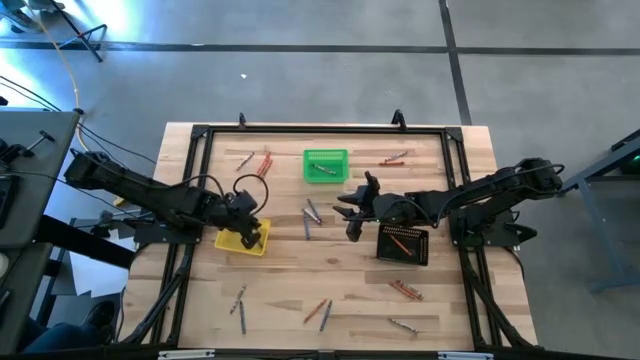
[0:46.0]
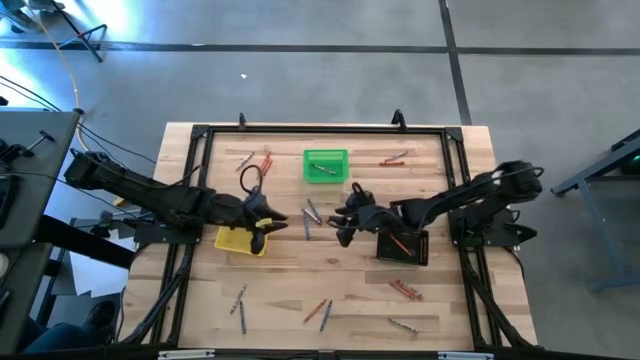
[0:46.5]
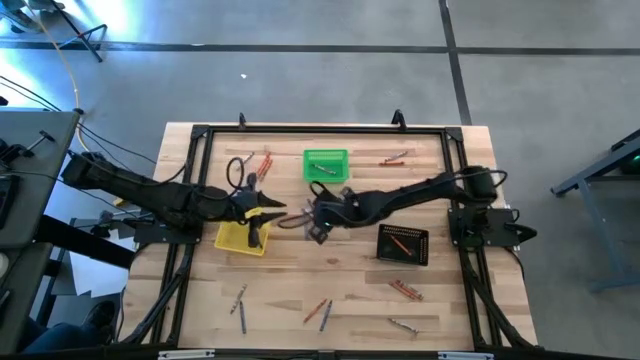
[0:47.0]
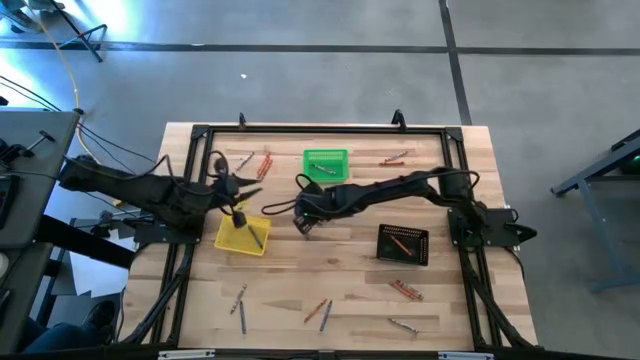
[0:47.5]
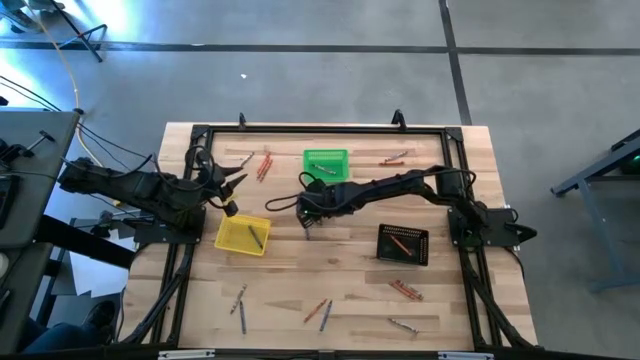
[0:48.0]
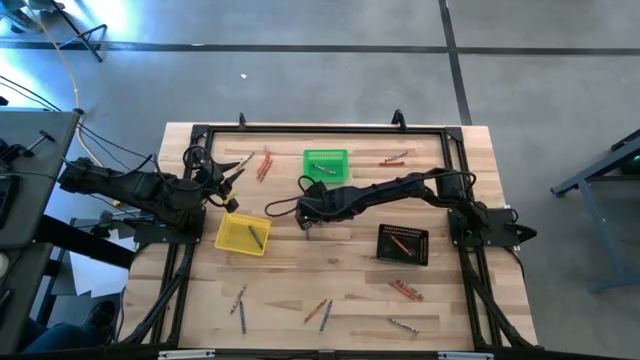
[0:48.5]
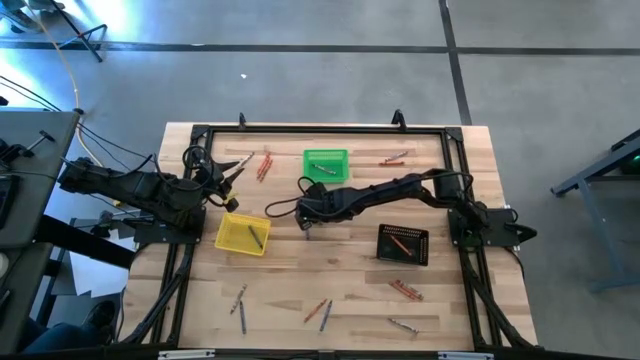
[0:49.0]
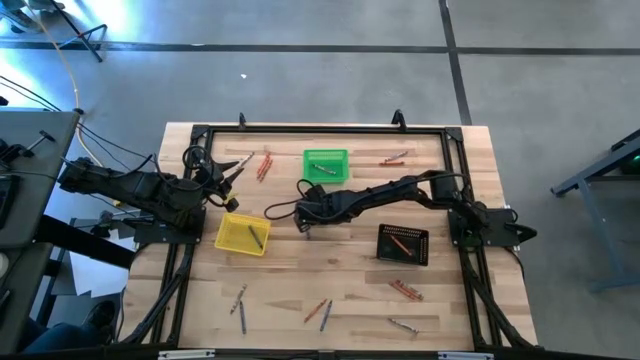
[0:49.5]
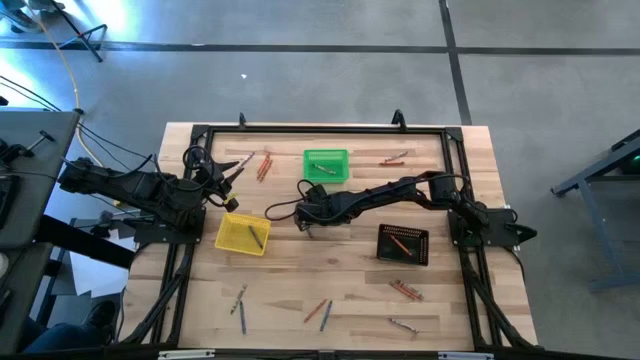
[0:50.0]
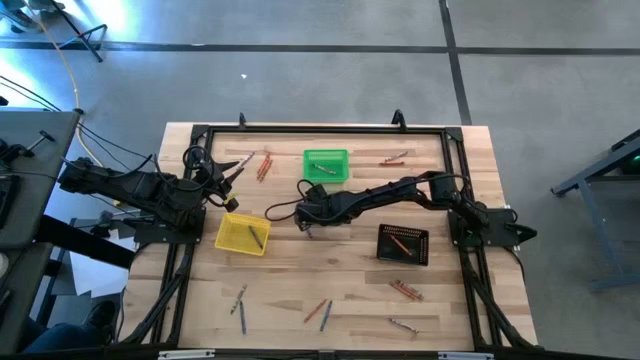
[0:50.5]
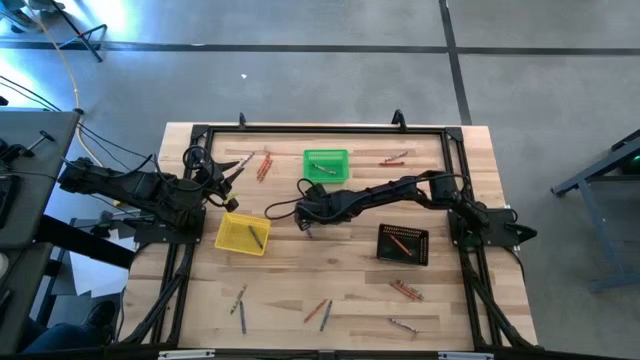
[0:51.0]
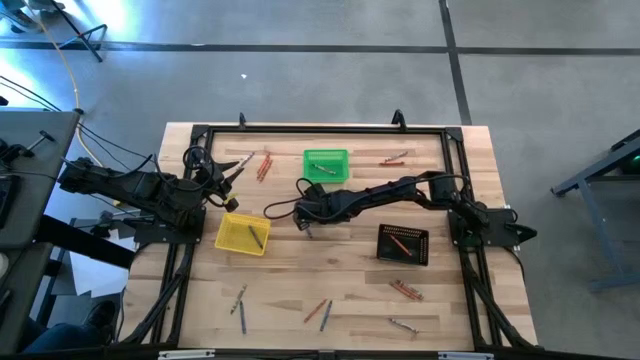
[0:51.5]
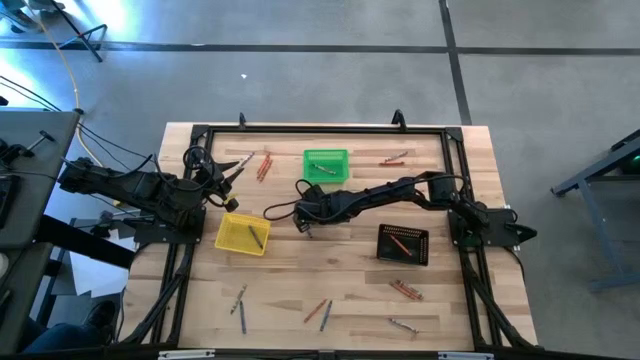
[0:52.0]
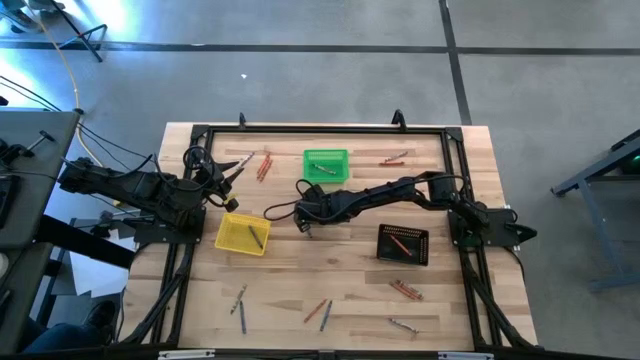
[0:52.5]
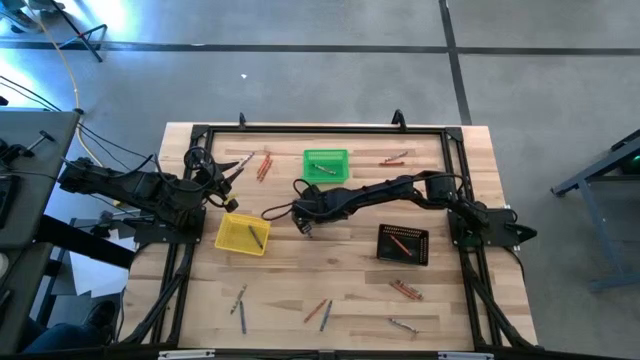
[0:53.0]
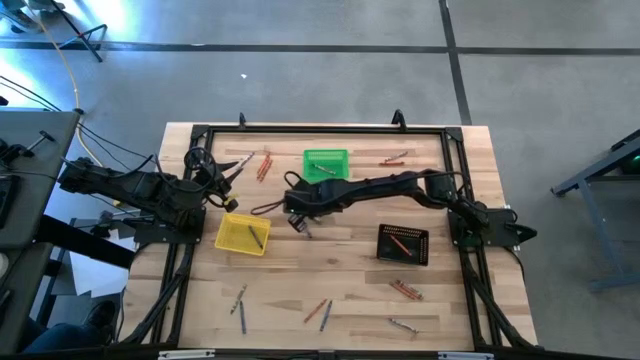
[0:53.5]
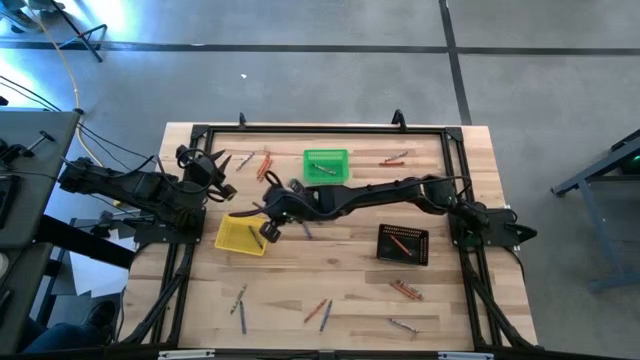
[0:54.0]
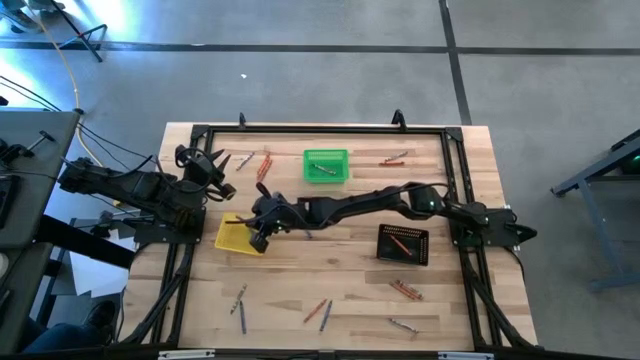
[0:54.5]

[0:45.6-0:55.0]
Task: Sort crayons
Put the blue crayon into the yellow basket

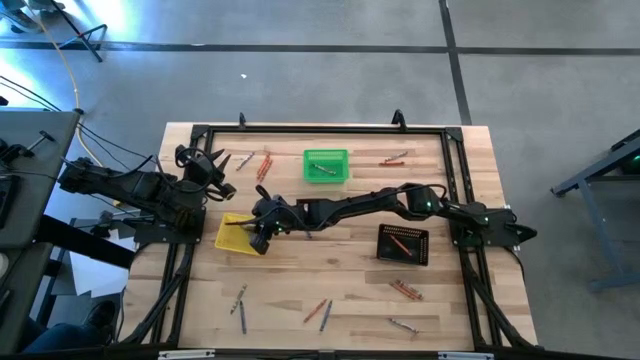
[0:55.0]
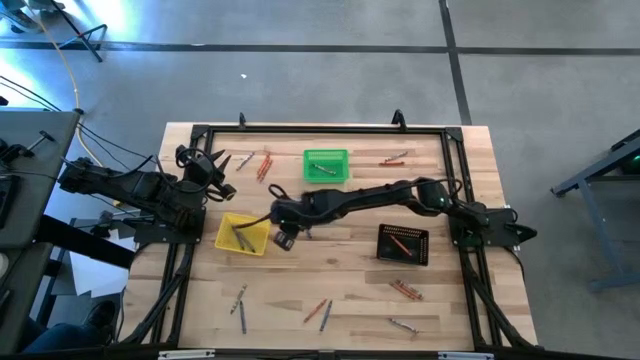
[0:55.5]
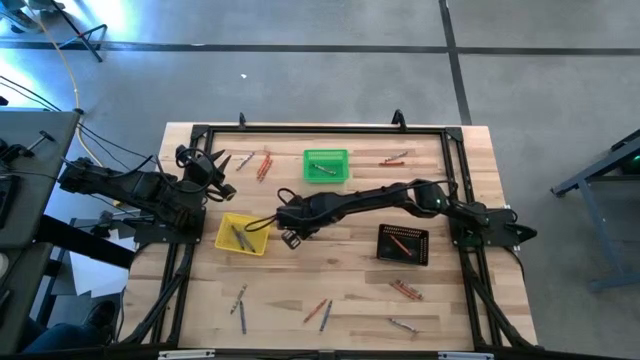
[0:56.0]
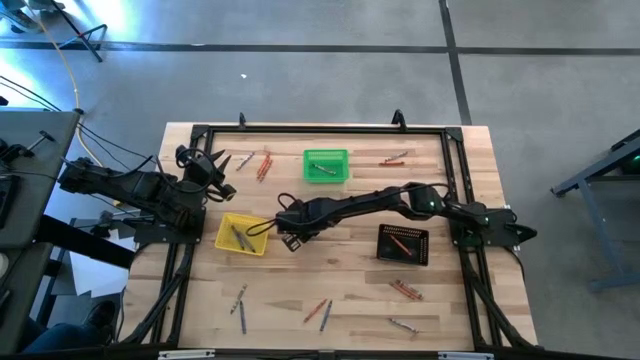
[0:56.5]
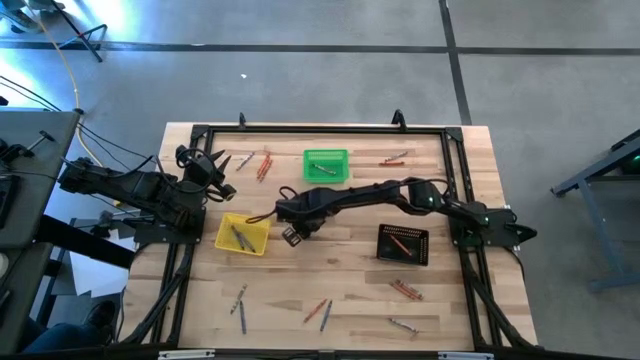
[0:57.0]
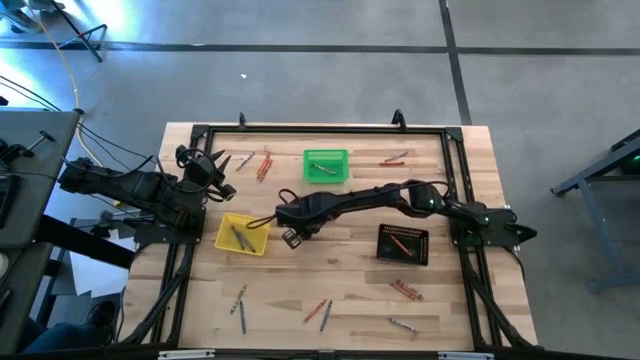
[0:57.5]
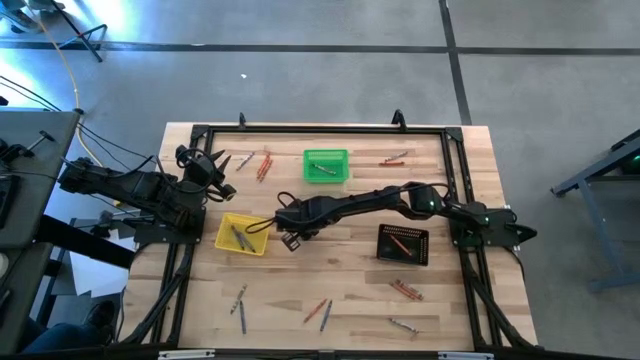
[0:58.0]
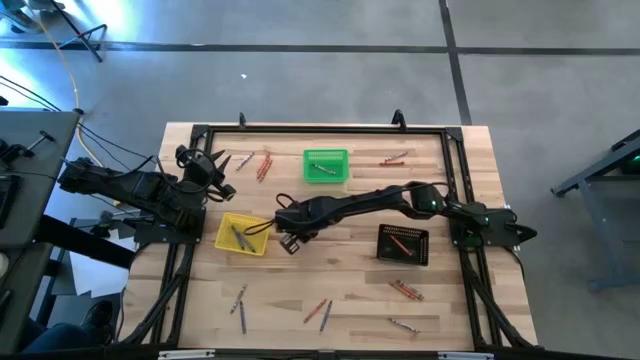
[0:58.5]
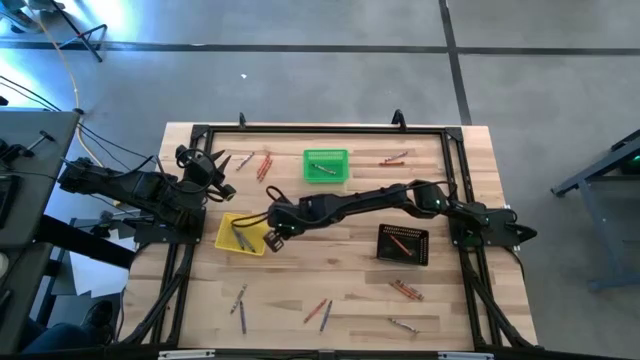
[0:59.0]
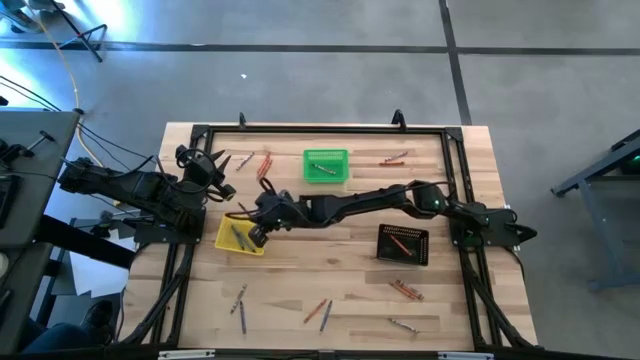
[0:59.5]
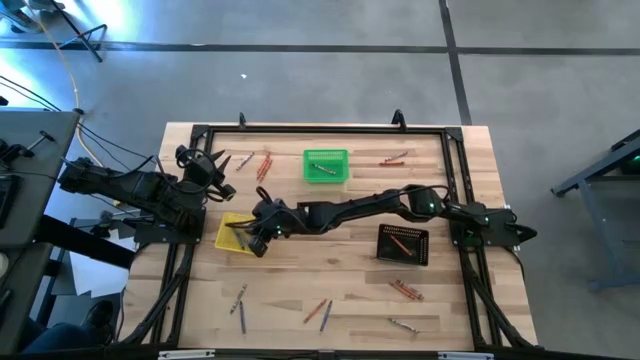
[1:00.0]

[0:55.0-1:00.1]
Put the blue crayon into the yellow basket

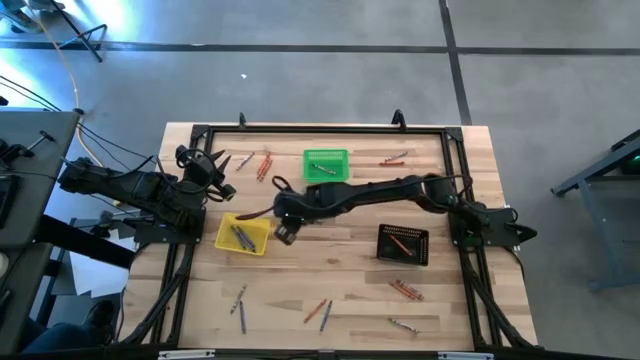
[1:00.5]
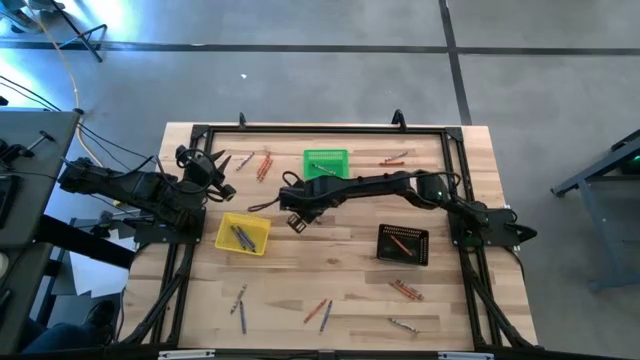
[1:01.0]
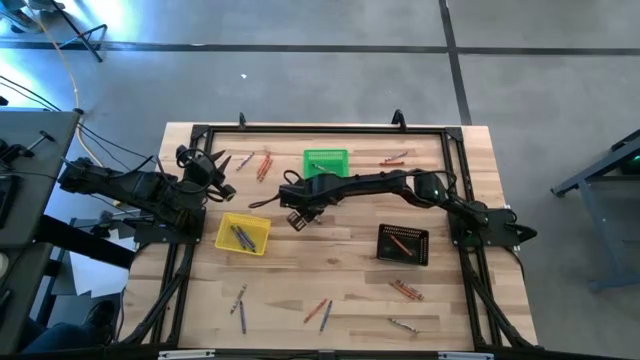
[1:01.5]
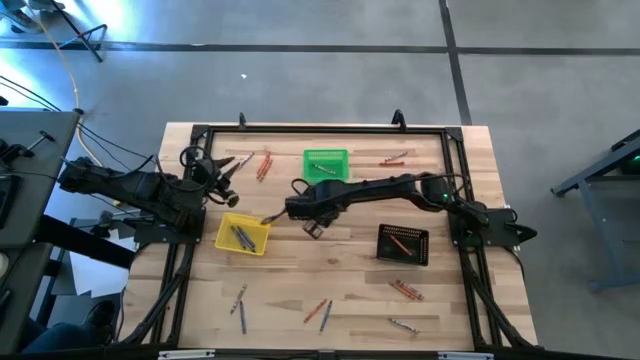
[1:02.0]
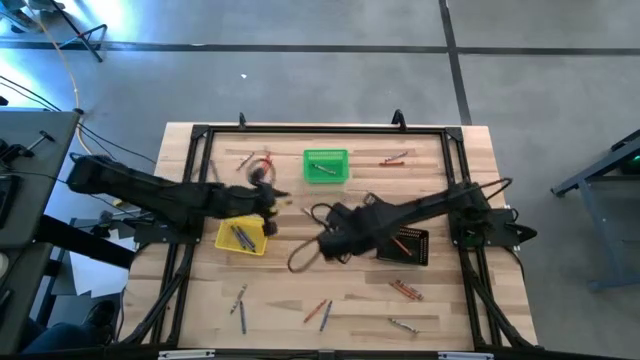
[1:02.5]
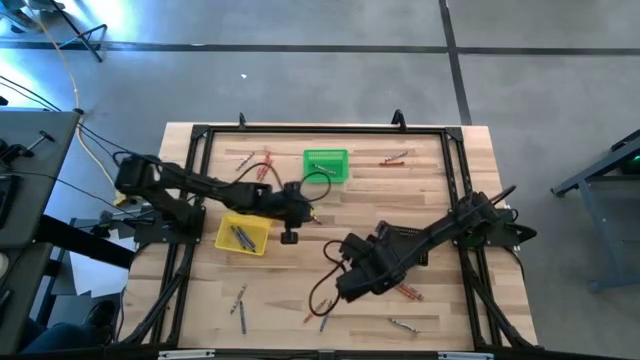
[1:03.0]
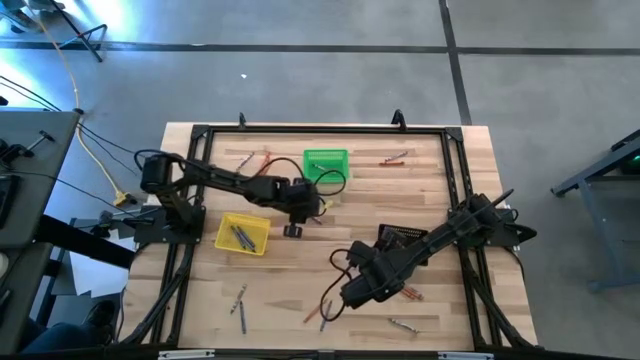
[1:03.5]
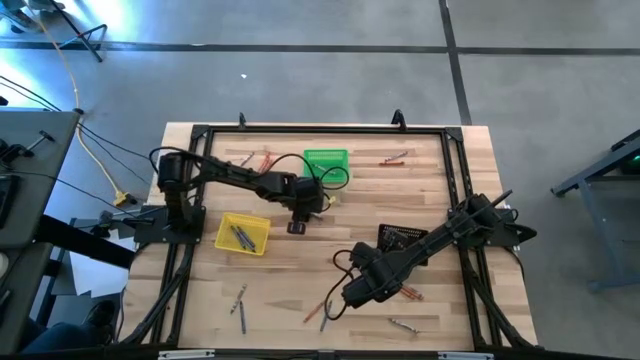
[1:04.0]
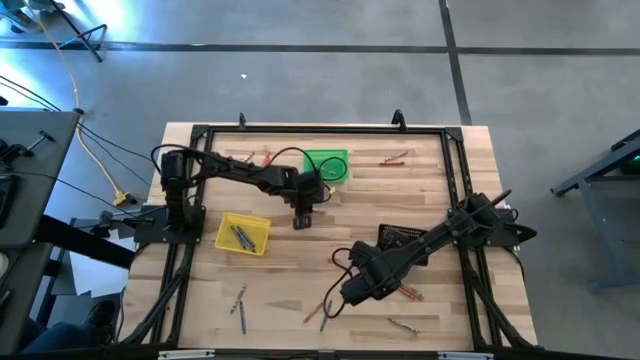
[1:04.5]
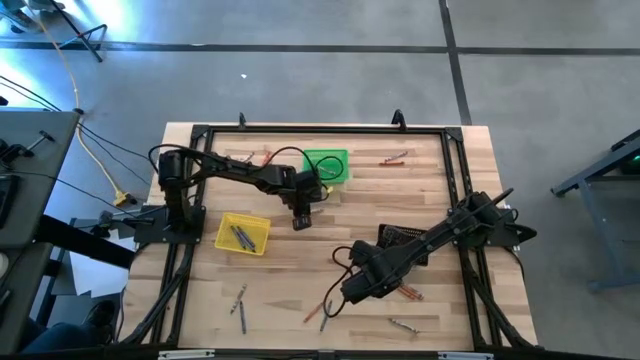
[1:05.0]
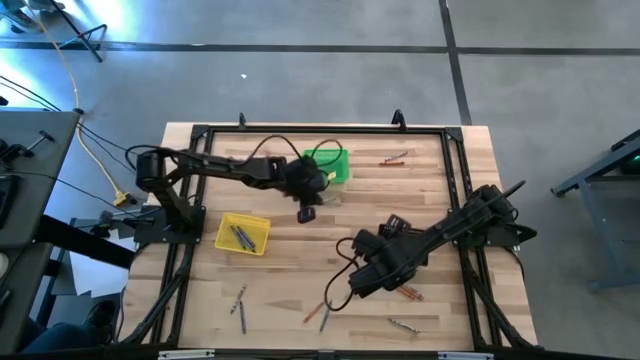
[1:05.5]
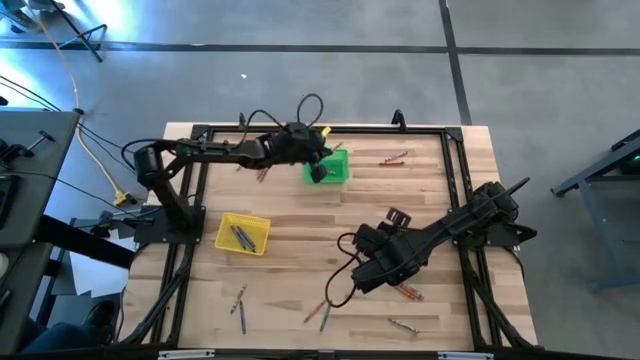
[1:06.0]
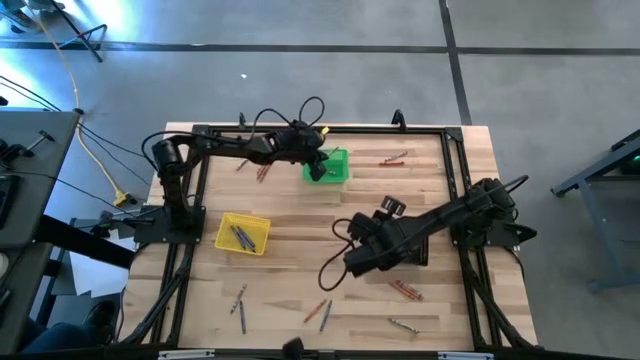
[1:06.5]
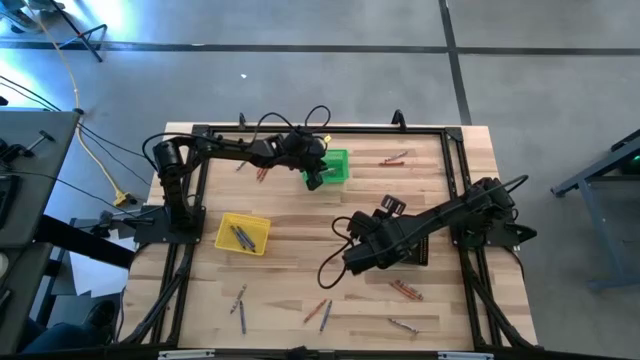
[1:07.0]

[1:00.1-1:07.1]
Put the gray crayon into the green basket

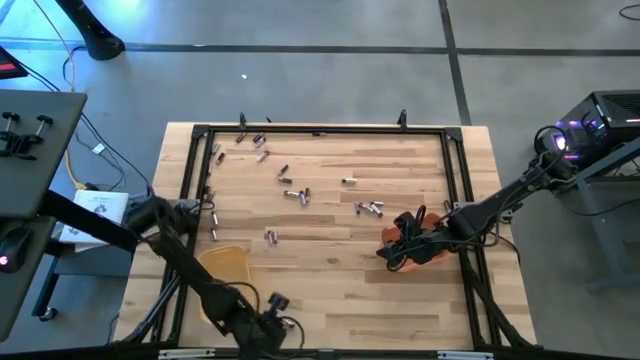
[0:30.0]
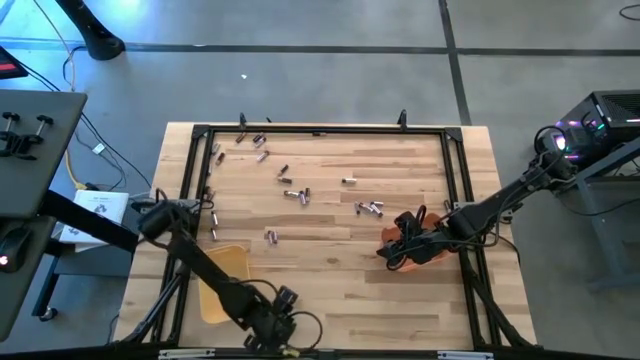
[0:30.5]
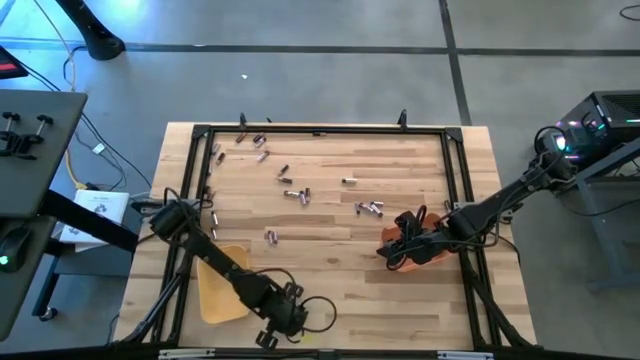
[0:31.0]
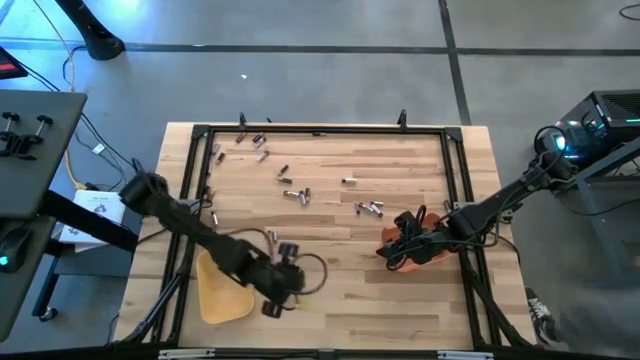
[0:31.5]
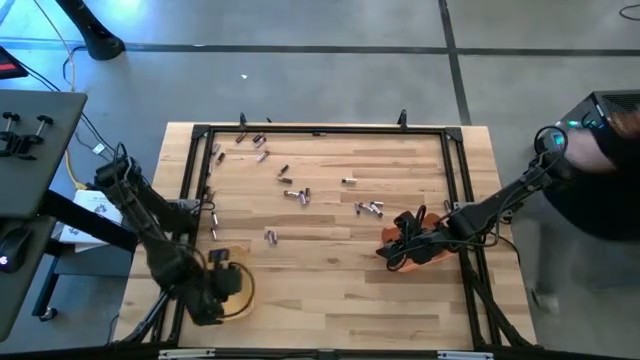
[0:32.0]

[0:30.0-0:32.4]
Task: Sort batteries
Put the silver battery into the yellow bin
